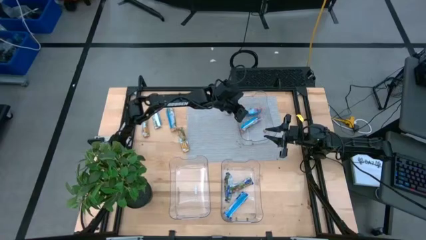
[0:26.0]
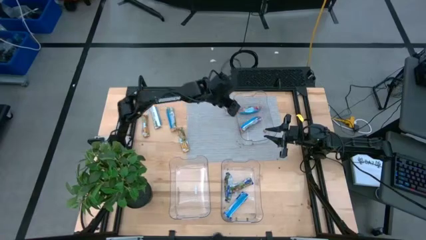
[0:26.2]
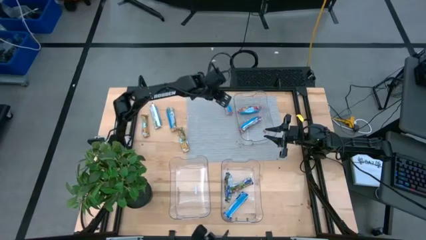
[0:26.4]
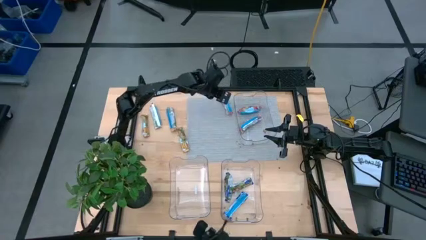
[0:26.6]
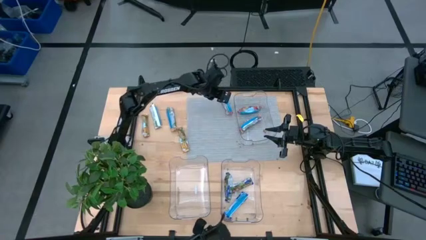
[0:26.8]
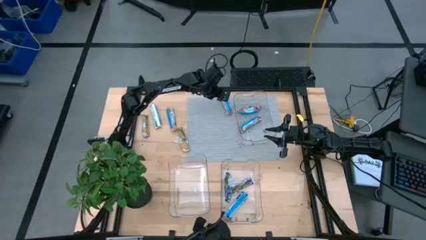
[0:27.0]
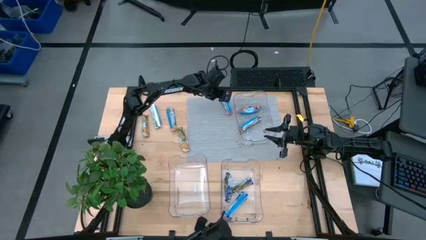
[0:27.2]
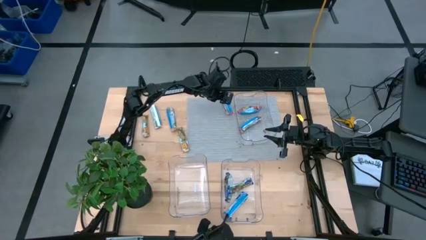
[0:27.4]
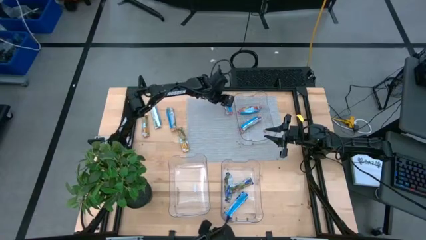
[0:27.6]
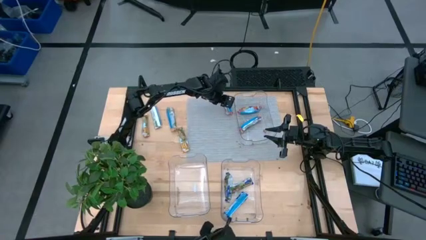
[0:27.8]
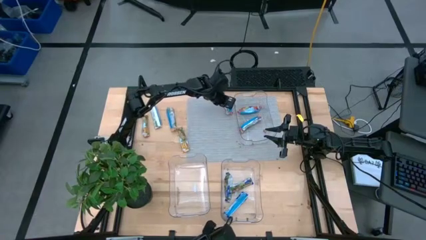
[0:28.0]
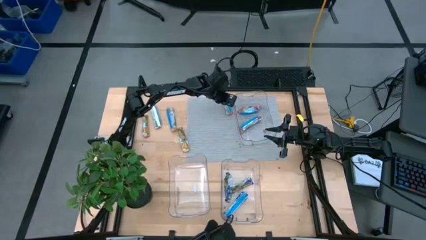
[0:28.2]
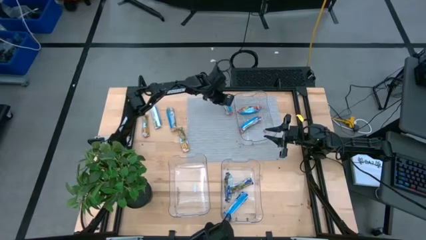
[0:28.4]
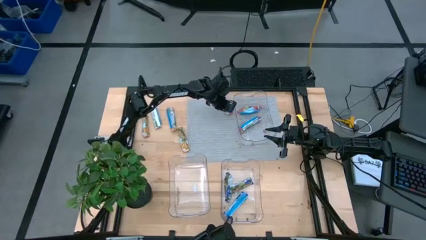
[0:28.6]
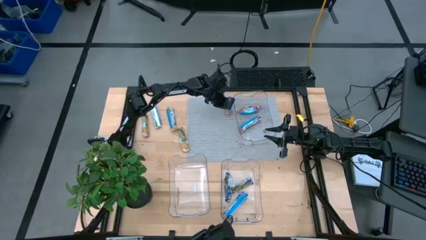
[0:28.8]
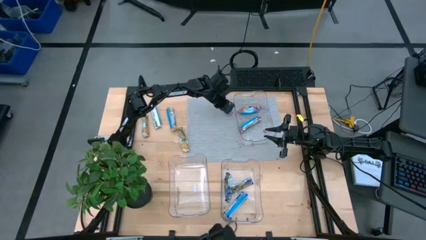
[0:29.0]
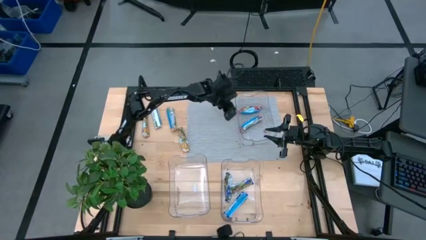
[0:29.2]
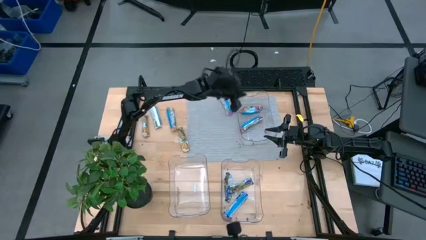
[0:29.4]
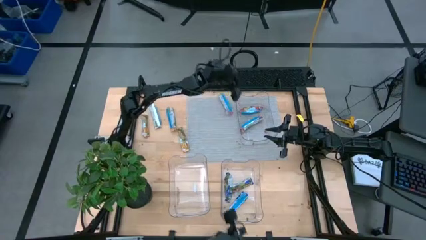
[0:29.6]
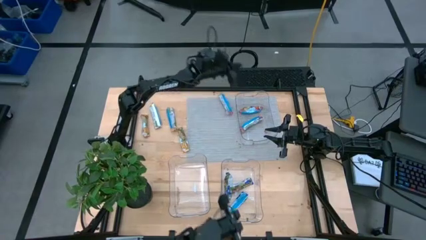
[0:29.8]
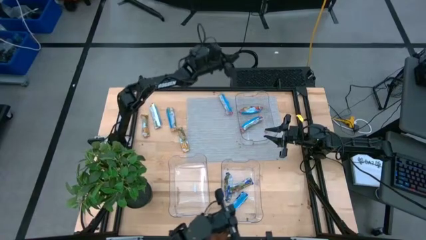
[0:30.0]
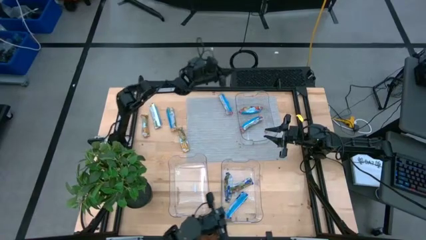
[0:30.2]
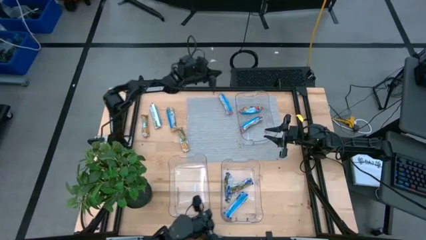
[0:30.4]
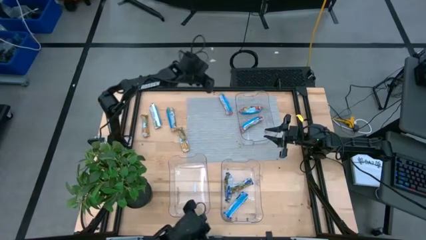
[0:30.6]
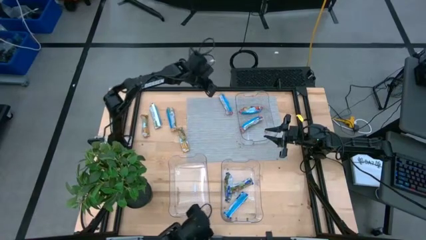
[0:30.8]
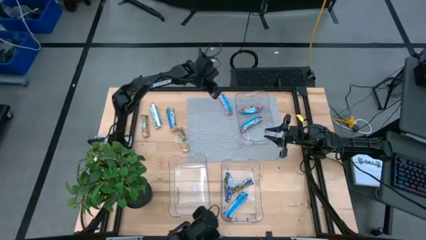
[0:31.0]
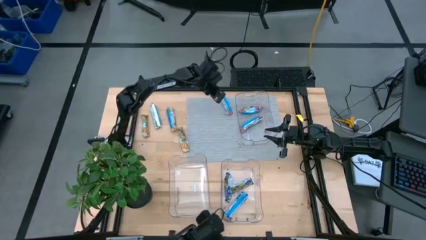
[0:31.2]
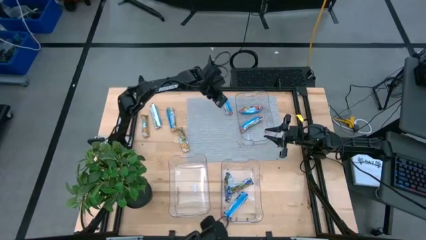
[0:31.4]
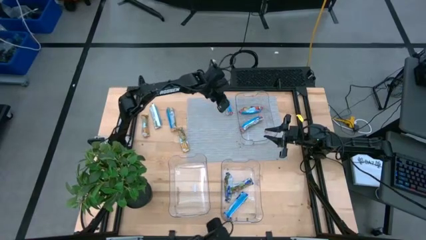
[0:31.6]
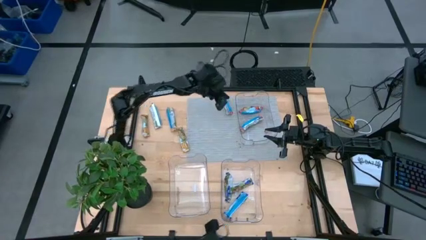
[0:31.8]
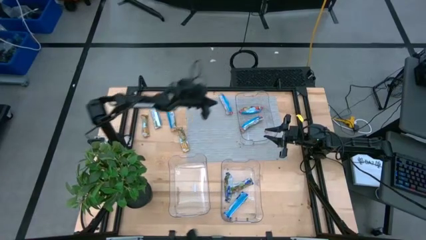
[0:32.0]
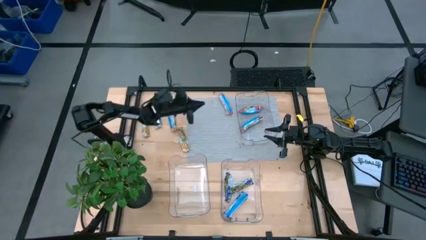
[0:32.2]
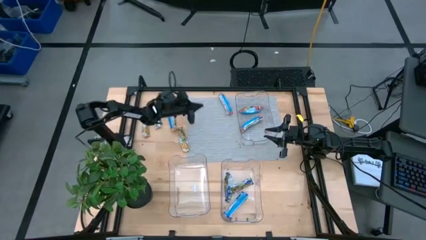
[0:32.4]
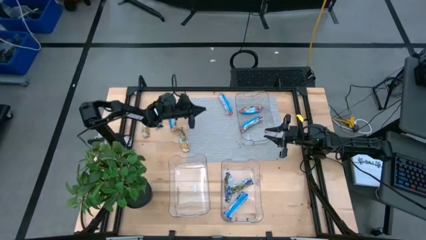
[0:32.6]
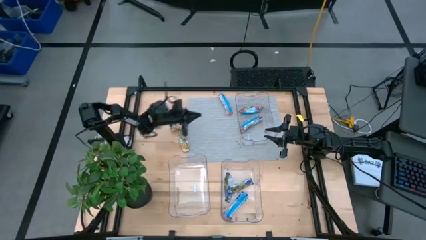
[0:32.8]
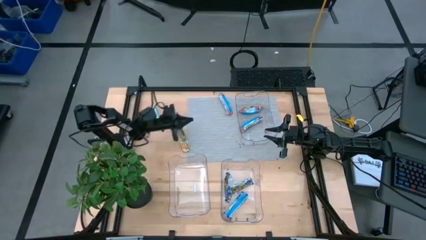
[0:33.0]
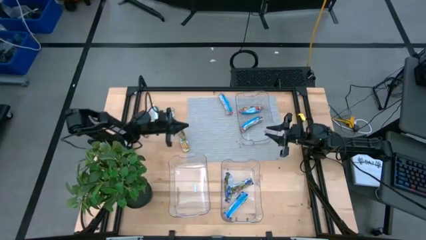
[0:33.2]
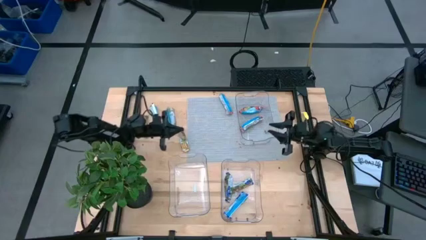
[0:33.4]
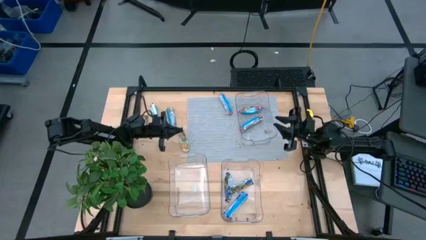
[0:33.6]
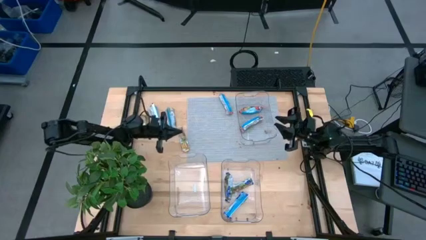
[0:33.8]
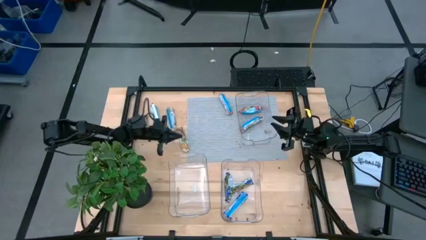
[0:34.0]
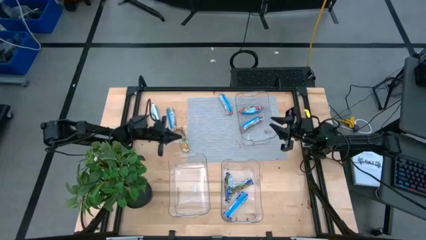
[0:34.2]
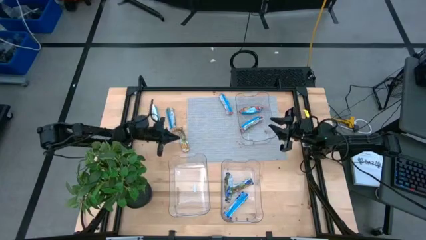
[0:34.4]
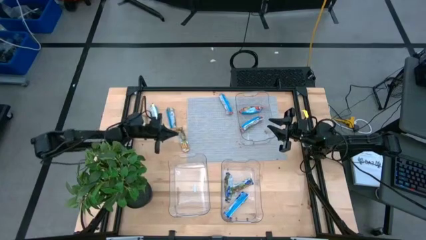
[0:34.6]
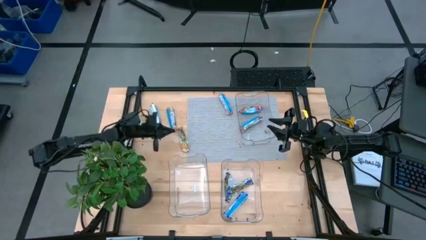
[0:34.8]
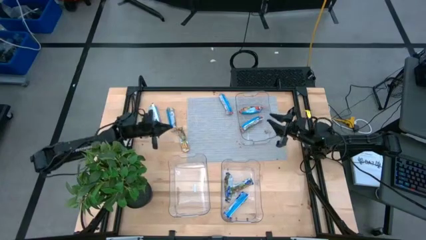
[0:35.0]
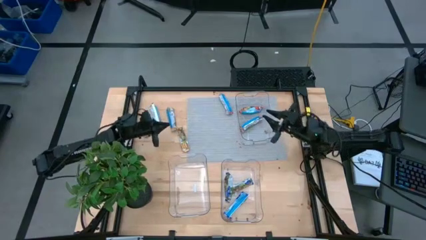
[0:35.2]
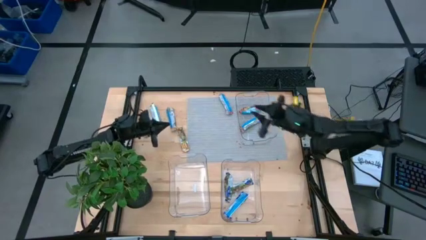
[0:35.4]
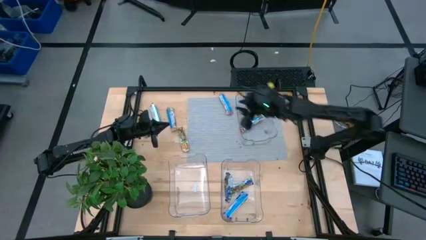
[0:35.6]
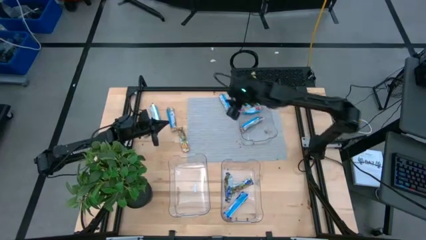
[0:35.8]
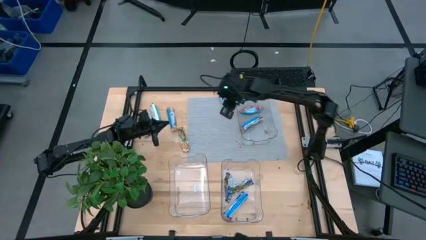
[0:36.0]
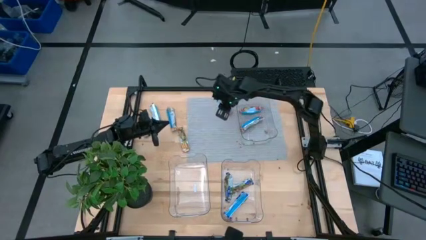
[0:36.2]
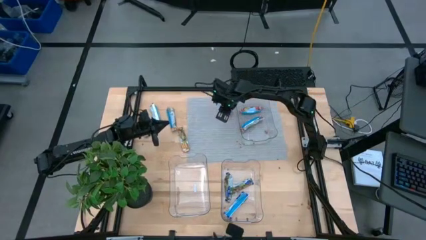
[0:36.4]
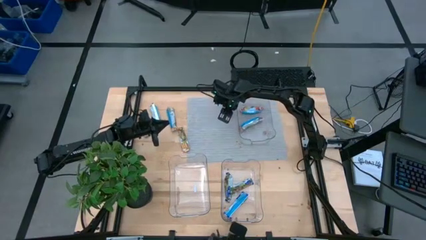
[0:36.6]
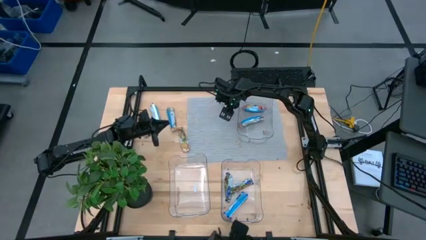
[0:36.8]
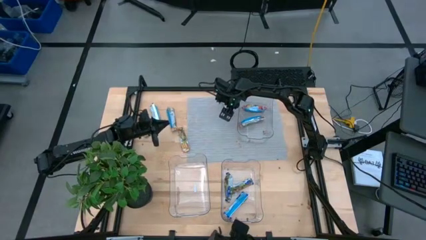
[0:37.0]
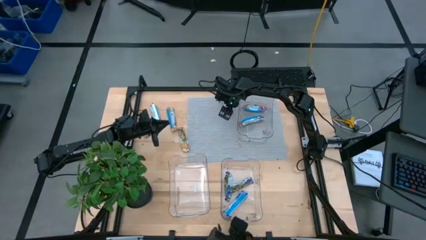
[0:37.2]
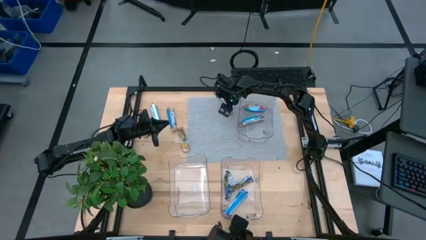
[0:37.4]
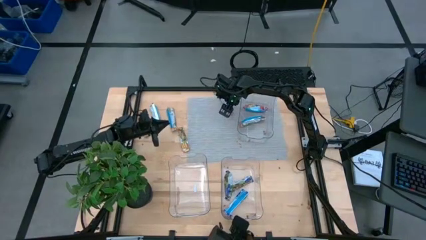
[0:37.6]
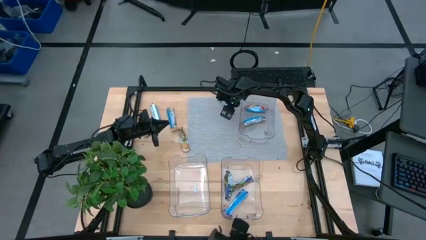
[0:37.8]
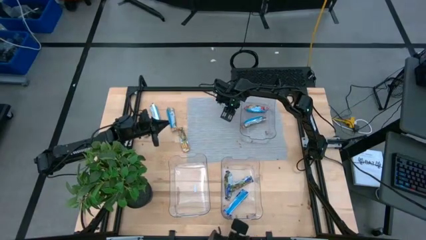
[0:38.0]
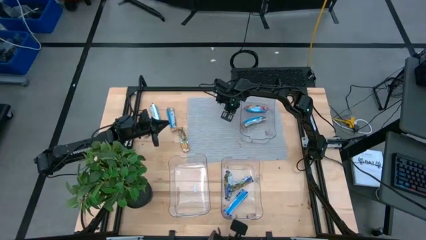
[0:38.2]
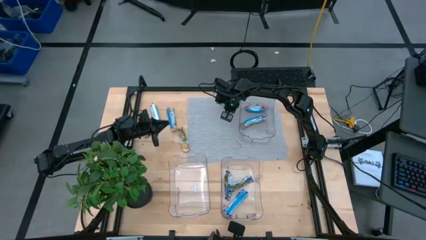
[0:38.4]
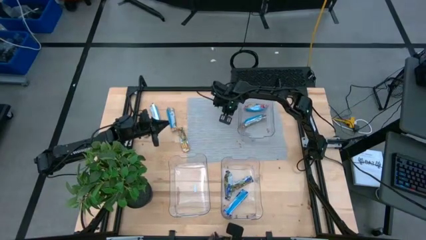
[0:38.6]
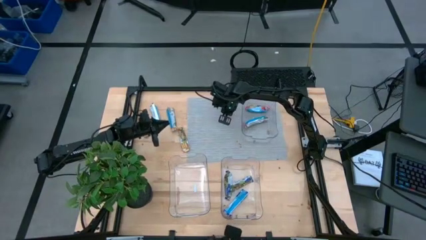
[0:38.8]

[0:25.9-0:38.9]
Task: Pick and place Granola Bars by type
Put the red granola bar into the top transparent bin
